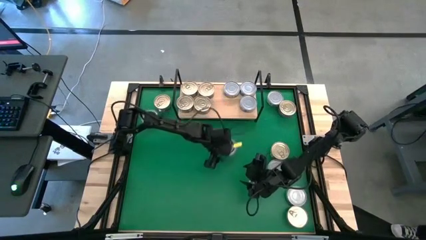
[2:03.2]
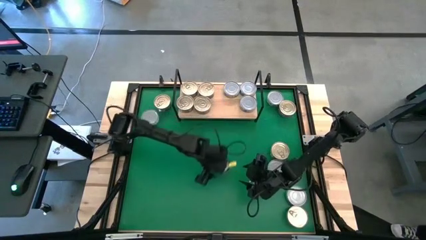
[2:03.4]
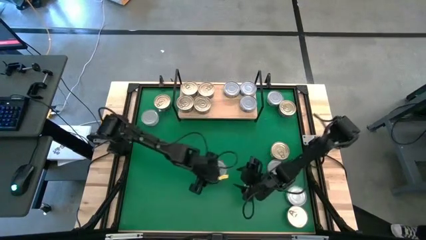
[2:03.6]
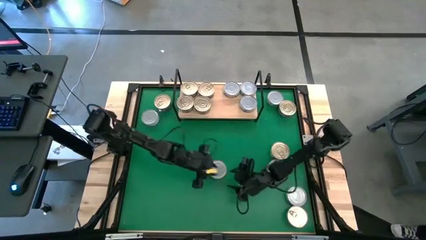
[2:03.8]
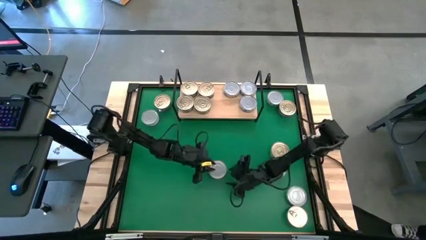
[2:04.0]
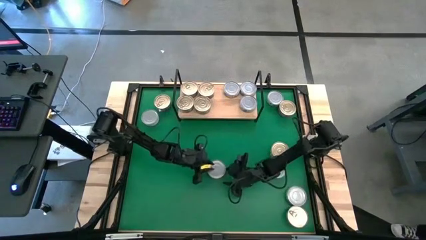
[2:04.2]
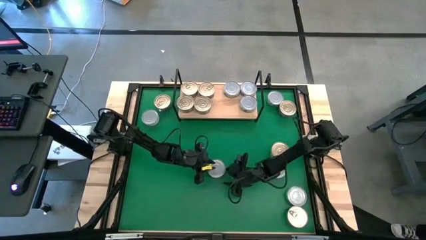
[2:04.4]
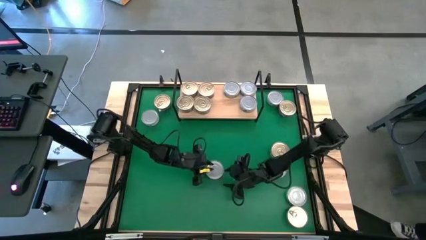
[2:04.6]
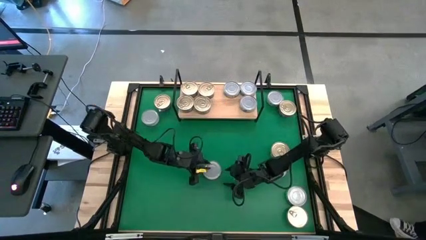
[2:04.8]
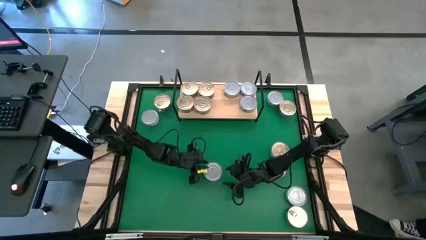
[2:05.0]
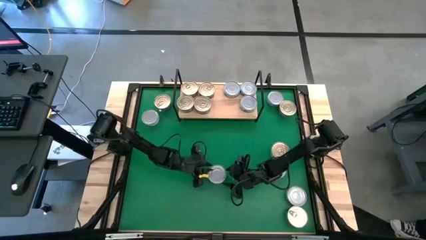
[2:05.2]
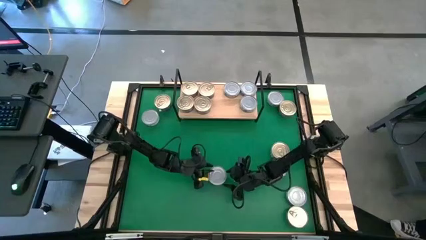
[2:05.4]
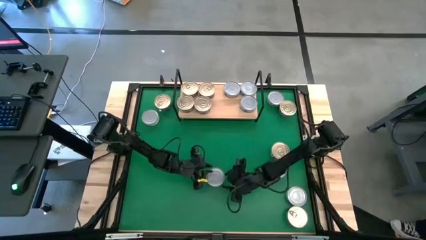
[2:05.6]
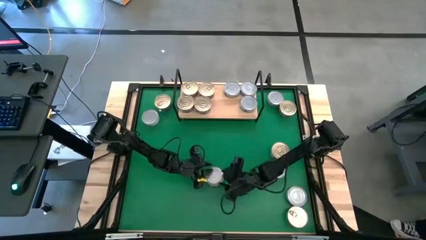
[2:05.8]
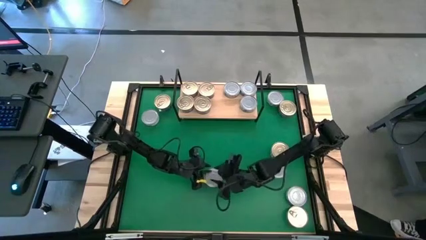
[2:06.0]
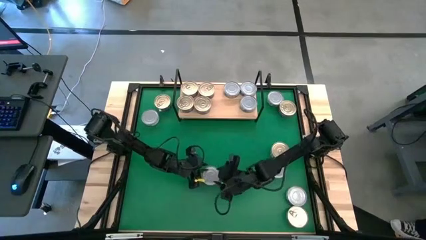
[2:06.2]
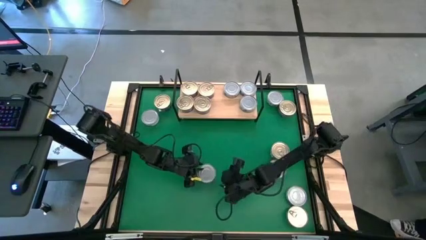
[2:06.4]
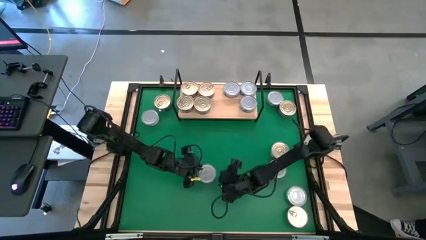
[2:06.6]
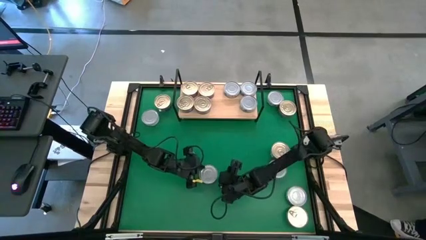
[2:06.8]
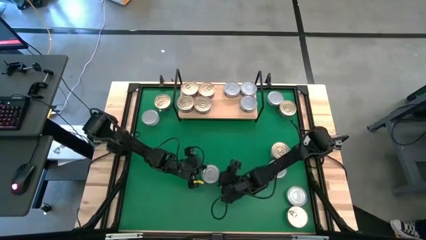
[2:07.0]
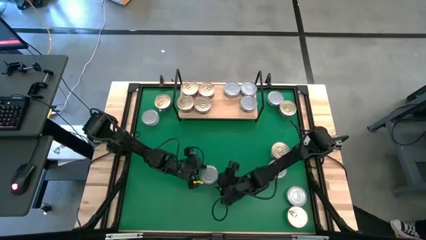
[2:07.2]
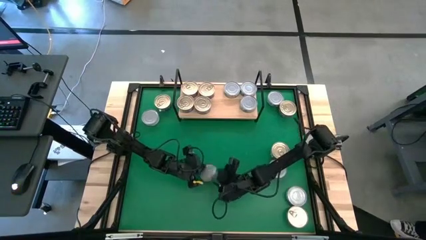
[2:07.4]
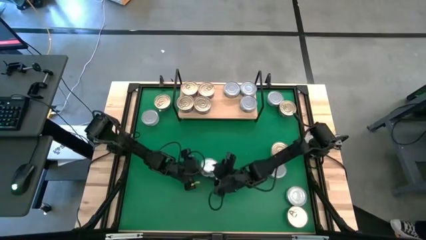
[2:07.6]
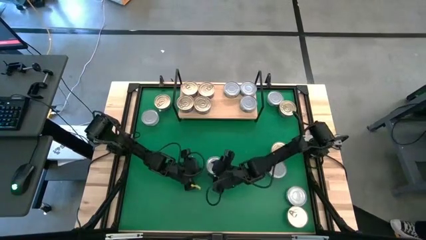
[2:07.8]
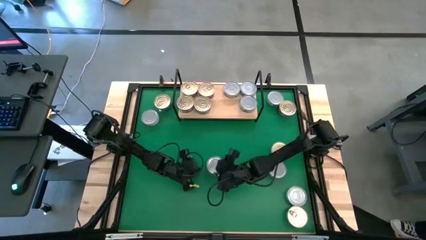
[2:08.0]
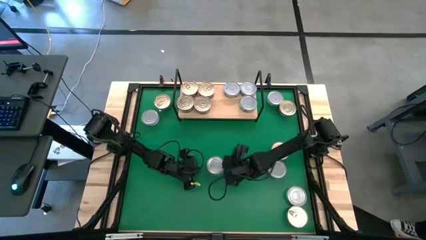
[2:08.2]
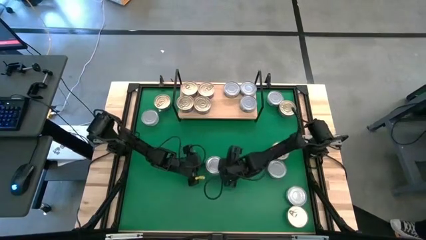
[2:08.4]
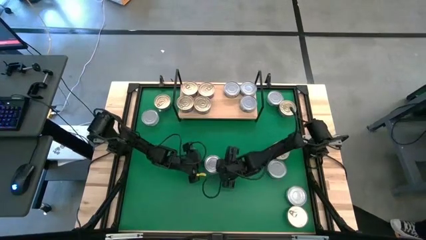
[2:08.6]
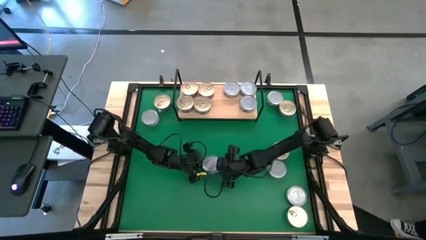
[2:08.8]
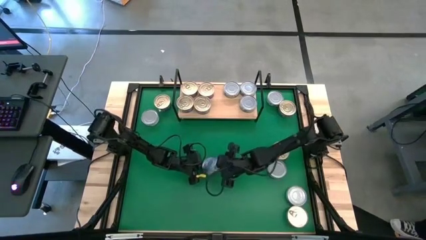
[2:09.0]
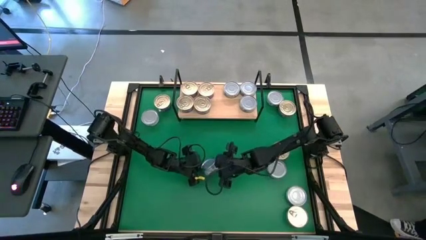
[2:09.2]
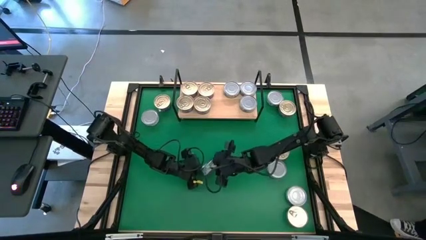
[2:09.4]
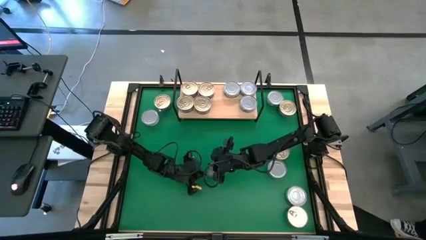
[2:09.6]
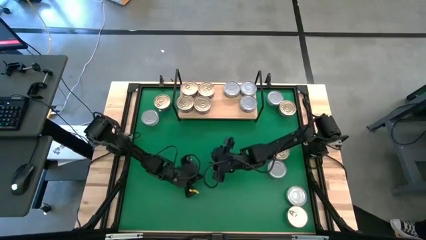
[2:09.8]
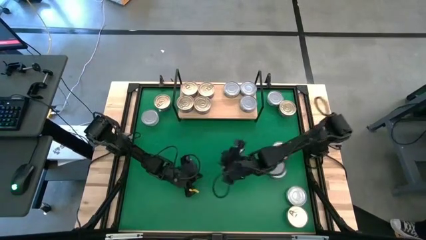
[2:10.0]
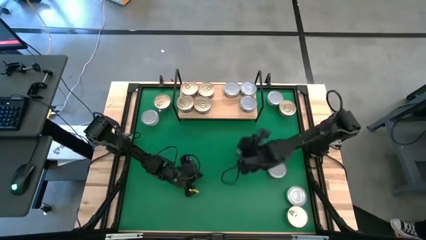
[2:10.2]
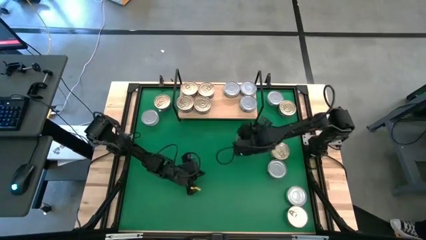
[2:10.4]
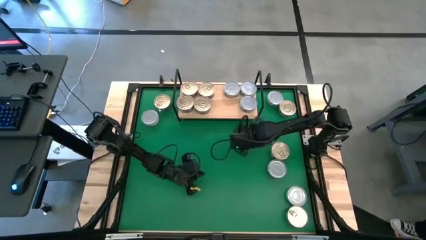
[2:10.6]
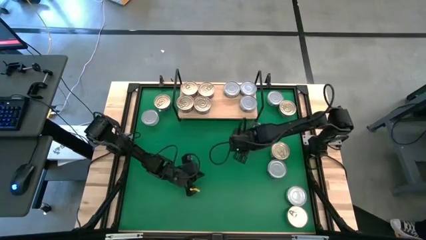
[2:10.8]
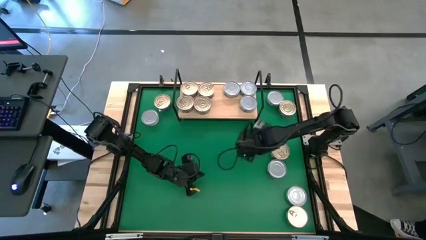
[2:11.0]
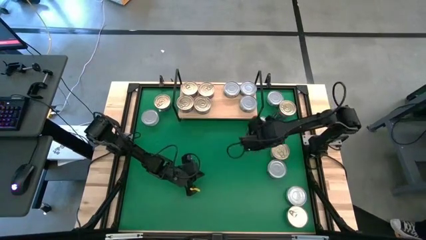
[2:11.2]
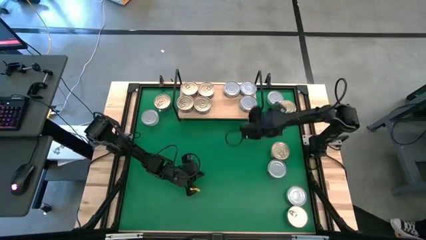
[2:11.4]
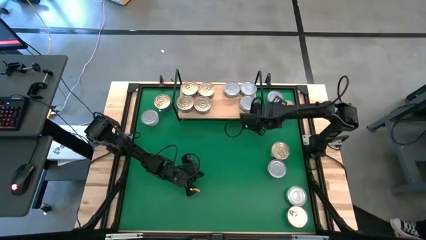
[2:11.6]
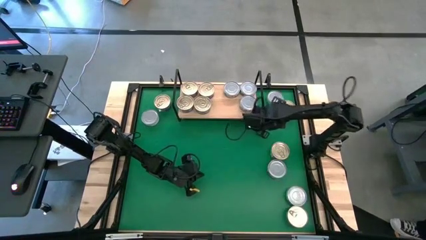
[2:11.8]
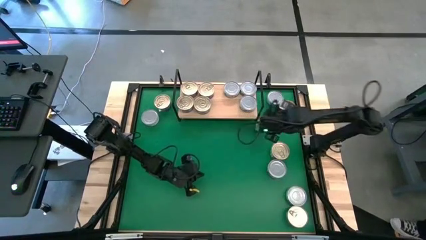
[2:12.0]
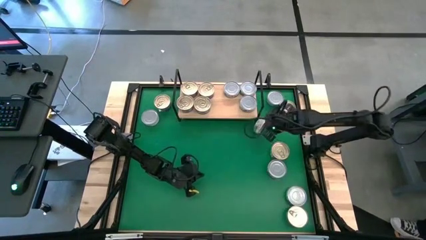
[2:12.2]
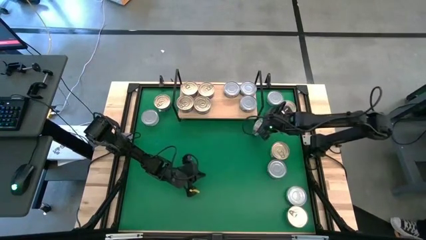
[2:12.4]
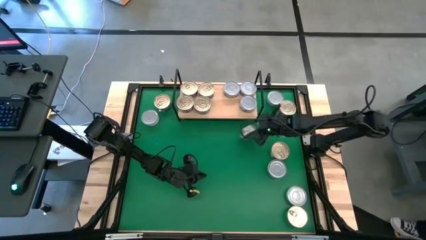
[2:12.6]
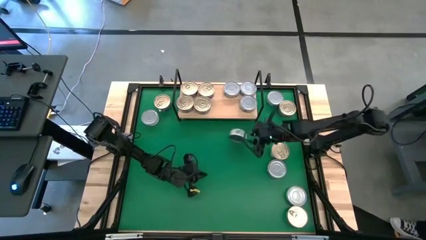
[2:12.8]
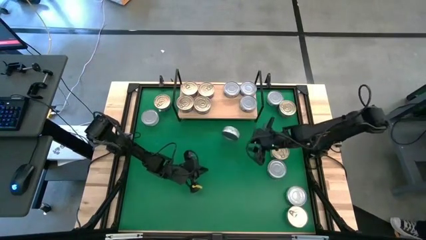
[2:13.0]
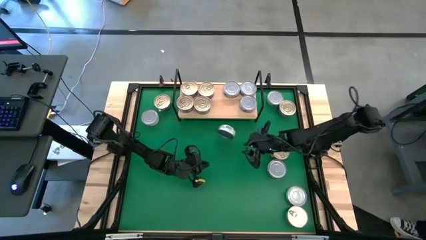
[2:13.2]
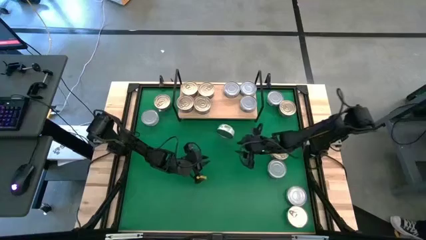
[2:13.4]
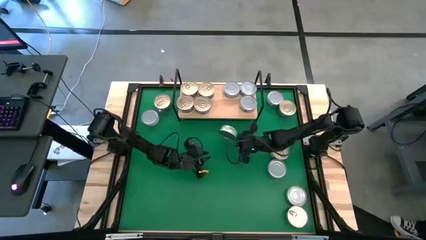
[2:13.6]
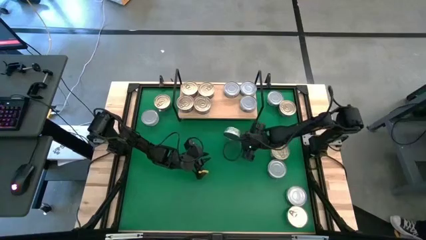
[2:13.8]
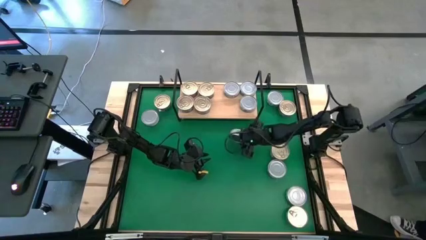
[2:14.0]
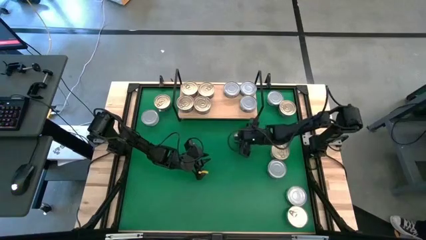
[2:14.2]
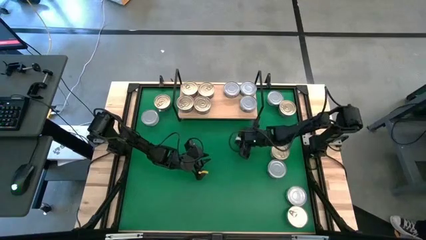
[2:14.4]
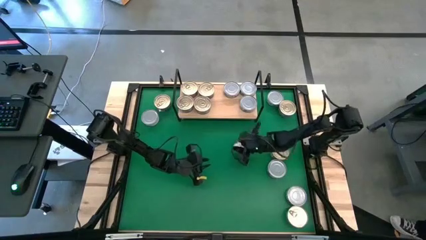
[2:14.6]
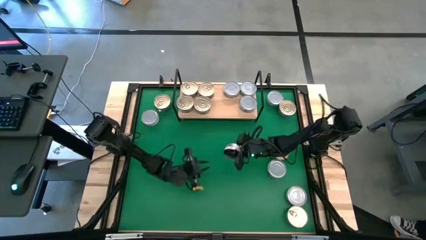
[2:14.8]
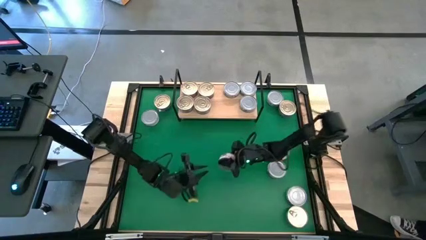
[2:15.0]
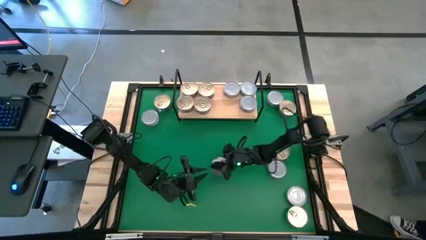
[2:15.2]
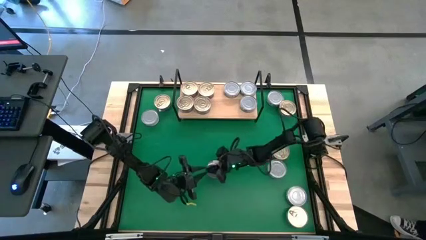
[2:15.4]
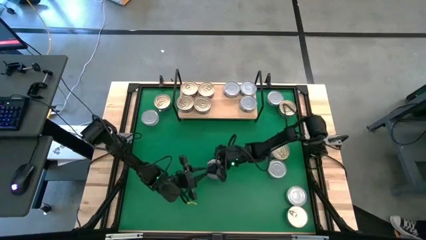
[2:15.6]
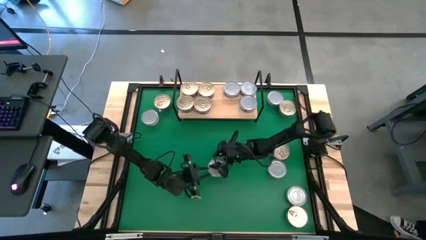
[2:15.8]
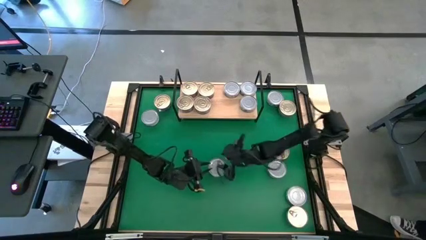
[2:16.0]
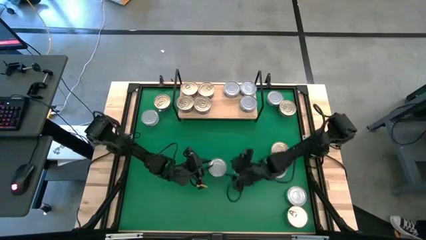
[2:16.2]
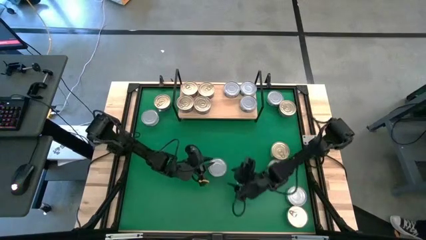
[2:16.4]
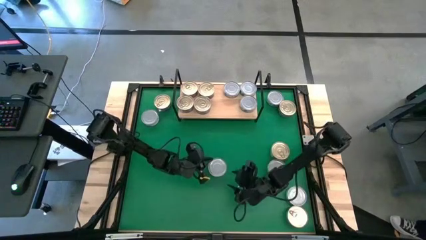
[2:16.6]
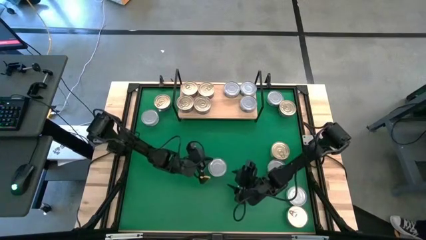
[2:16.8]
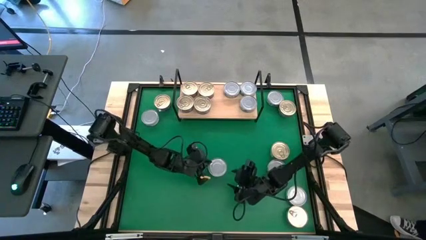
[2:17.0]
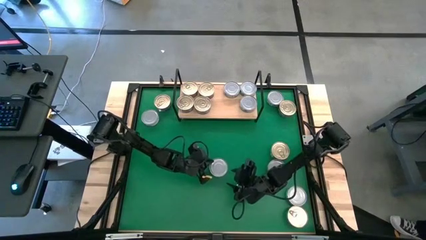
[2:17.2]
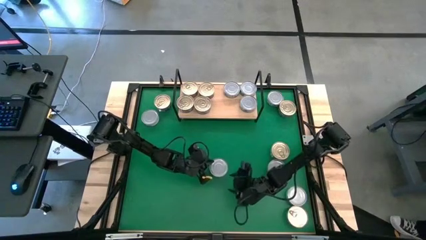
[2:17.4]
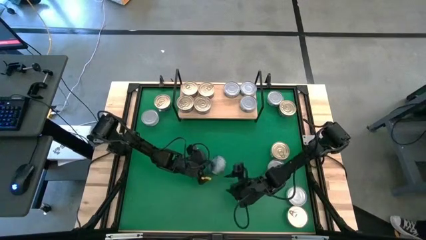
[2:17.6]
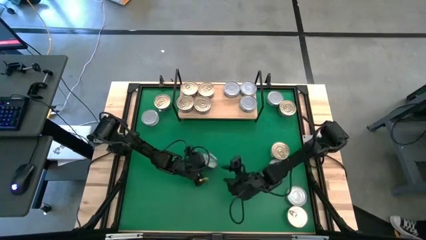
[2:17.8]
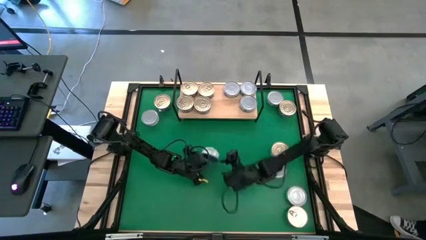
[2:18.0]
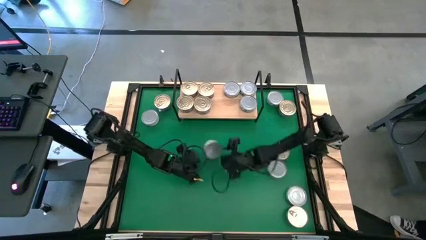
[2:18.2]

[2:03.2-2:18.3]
Task: Stack canned seafood by type on shelf
Put the green white tuna can on the shelf

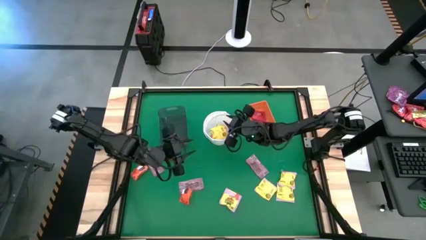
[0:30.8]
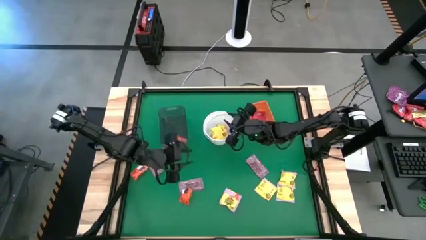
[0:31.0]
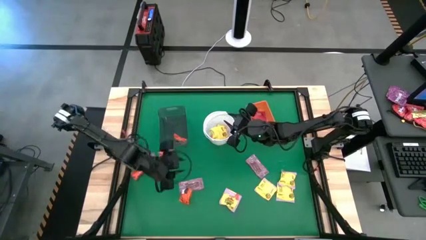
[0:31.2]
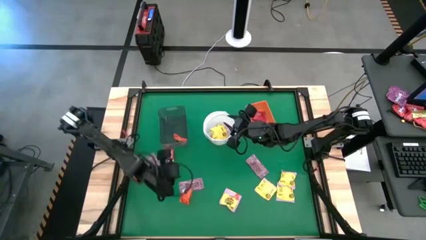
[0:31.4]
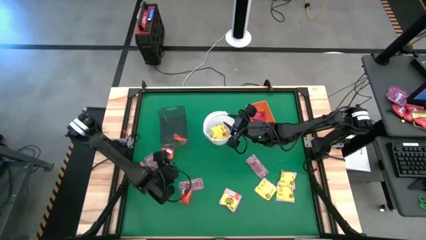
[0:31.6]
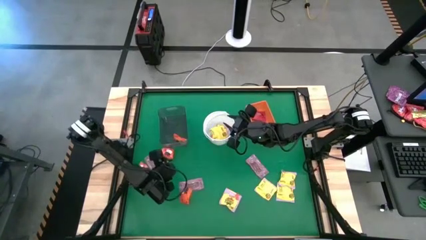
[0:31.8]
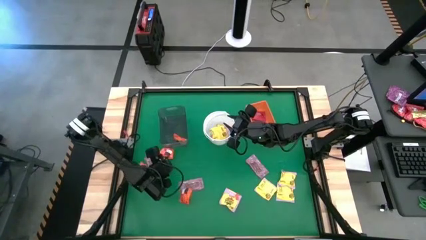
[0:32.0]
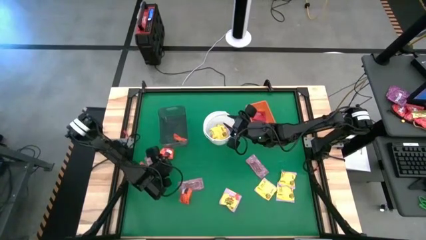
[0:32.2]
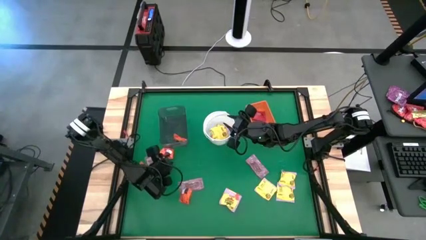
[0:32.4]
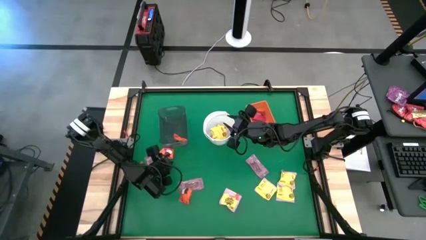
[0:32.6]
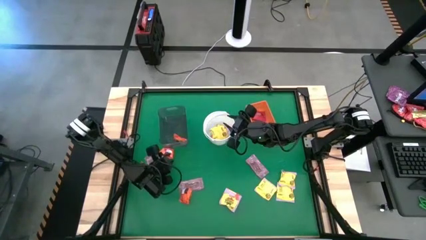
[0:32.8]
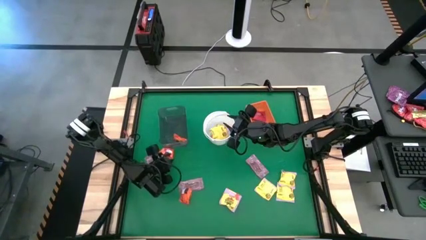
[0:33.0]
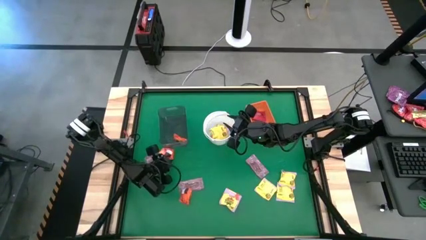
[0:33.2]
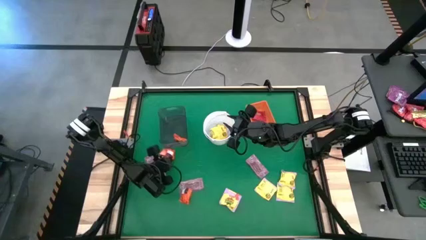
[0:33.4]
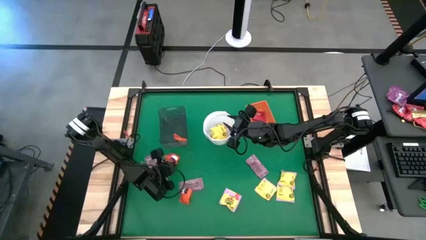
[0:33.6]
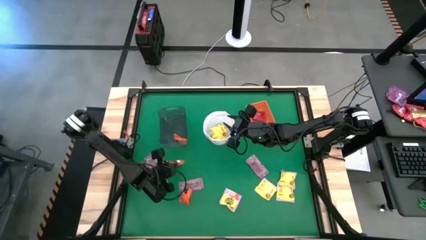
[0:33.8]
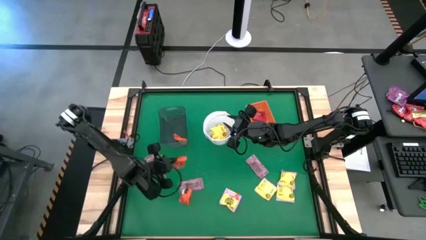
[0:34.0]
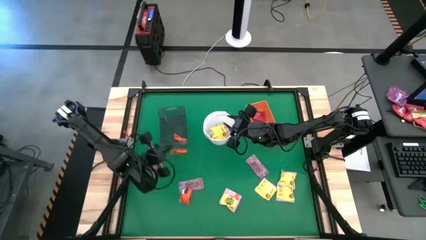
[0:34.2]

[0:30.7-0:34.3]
Task: Sort candy by brand, put in halloween buckets
Put the orange chocolate into the black bin
